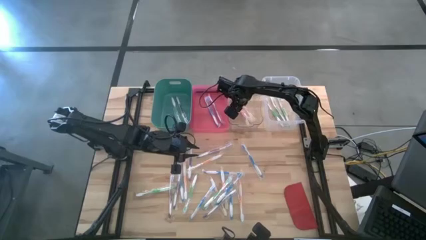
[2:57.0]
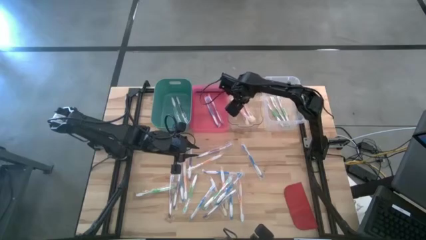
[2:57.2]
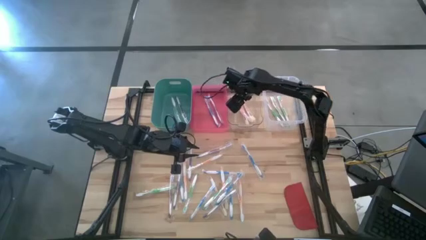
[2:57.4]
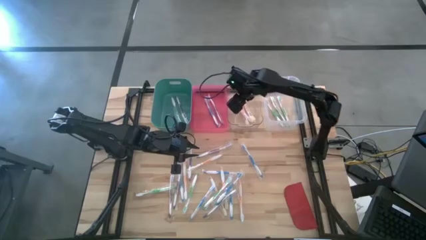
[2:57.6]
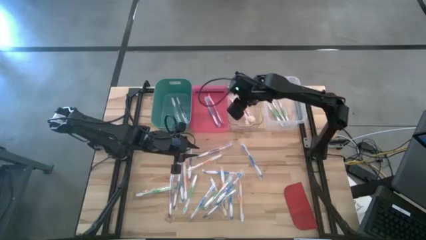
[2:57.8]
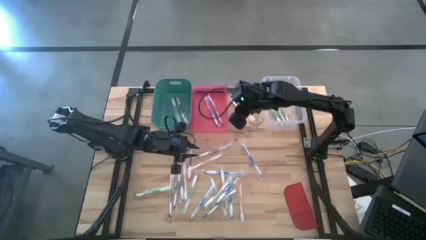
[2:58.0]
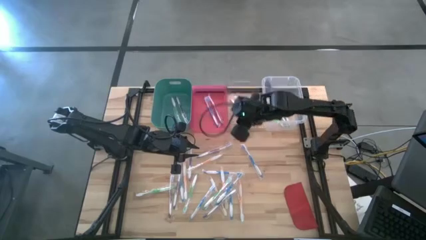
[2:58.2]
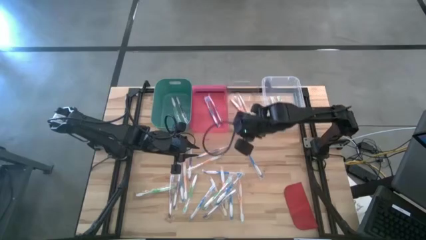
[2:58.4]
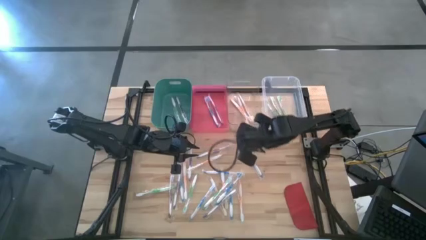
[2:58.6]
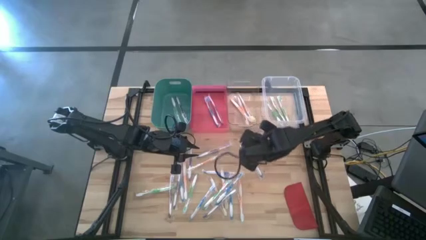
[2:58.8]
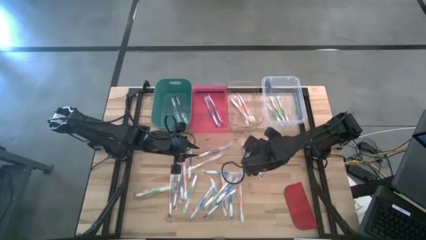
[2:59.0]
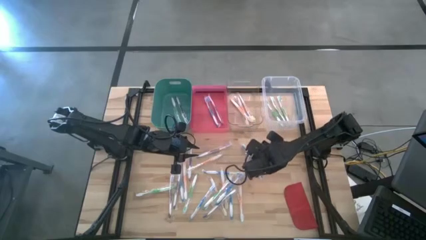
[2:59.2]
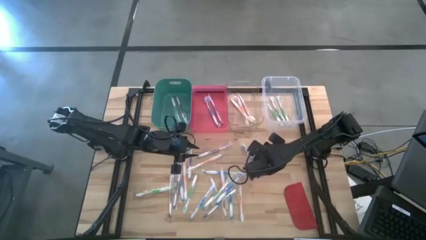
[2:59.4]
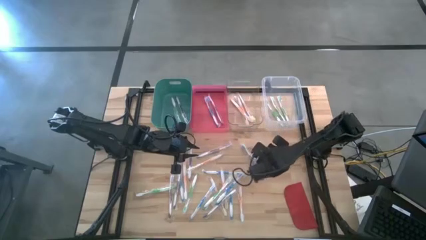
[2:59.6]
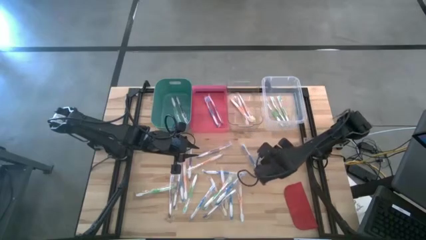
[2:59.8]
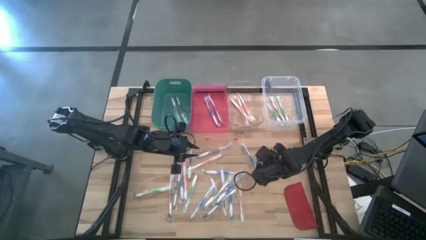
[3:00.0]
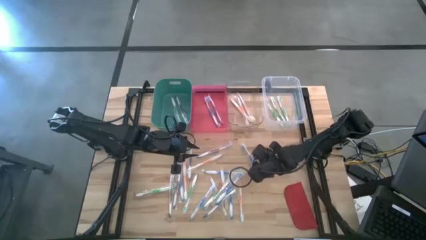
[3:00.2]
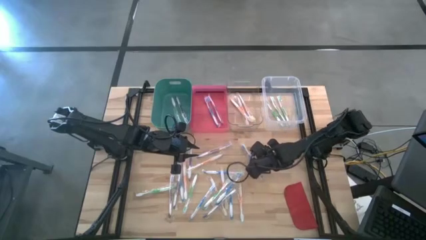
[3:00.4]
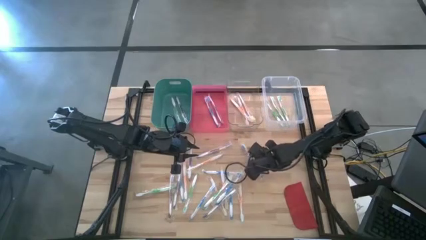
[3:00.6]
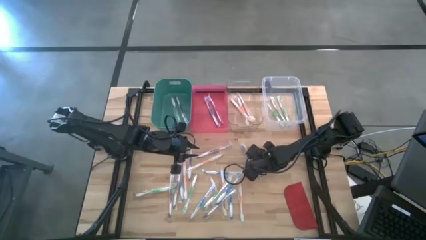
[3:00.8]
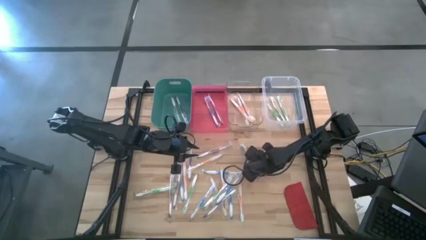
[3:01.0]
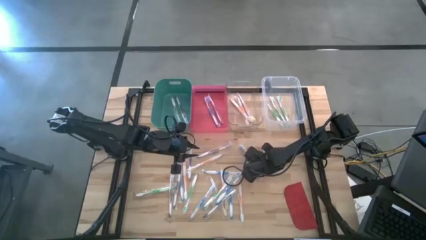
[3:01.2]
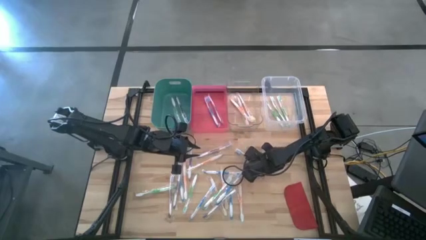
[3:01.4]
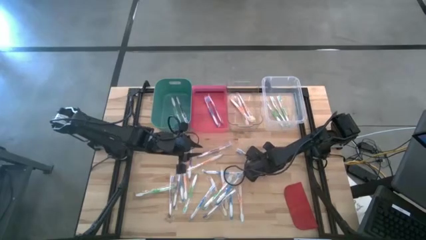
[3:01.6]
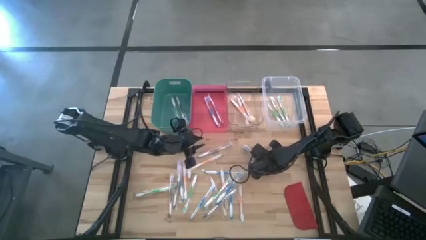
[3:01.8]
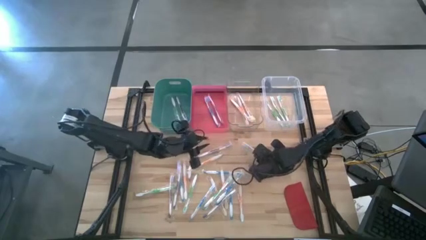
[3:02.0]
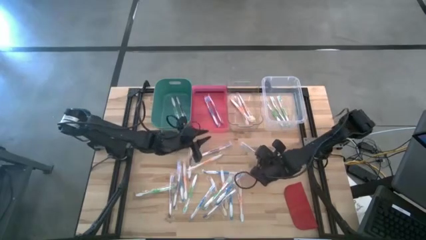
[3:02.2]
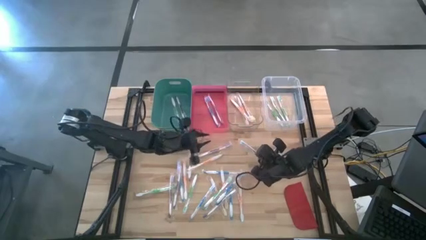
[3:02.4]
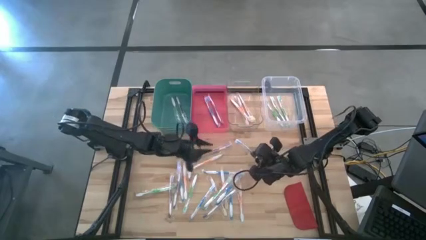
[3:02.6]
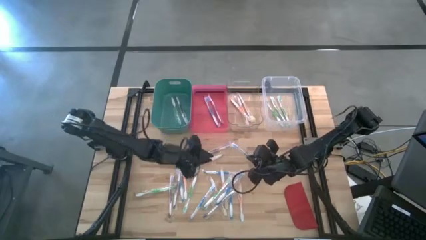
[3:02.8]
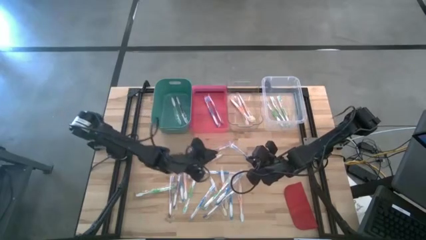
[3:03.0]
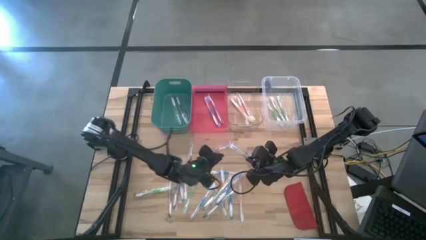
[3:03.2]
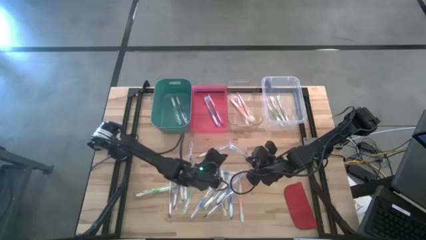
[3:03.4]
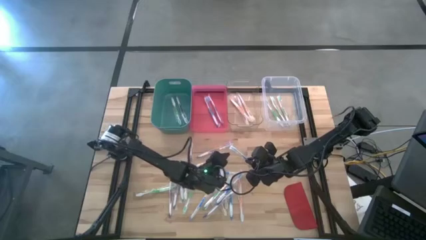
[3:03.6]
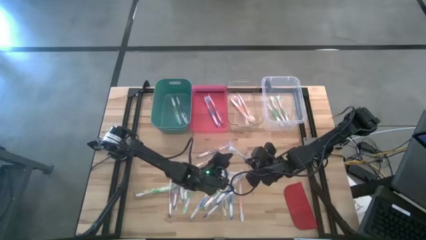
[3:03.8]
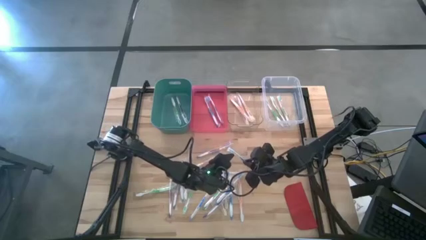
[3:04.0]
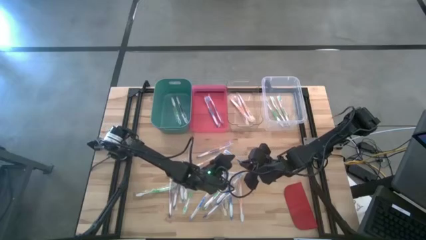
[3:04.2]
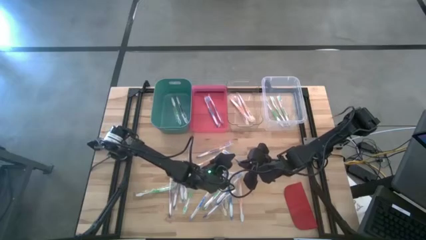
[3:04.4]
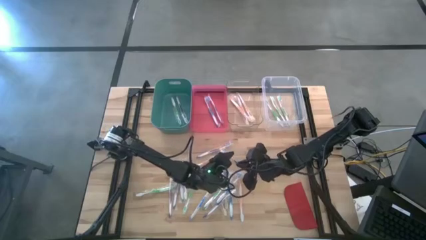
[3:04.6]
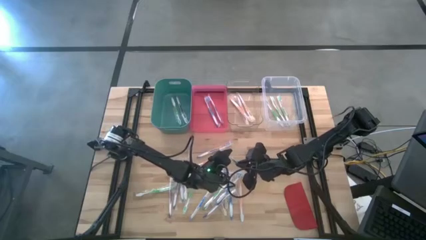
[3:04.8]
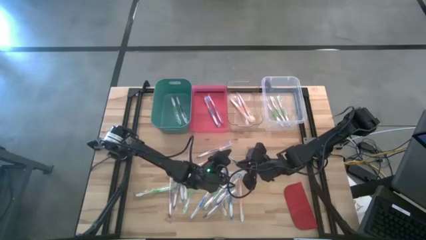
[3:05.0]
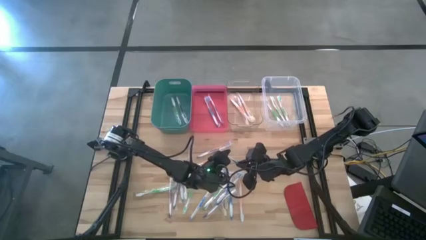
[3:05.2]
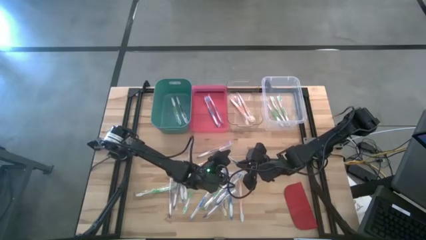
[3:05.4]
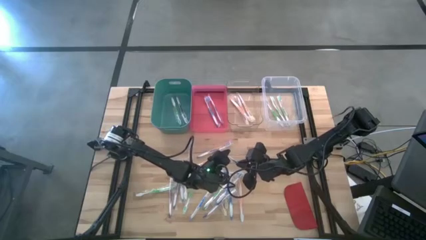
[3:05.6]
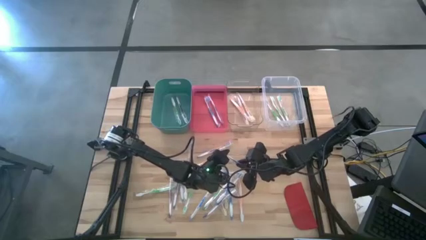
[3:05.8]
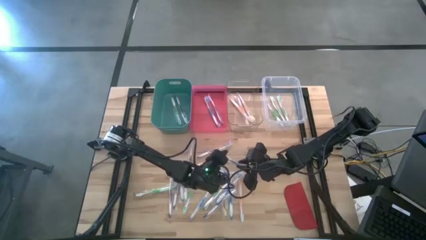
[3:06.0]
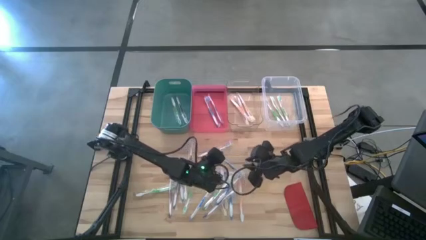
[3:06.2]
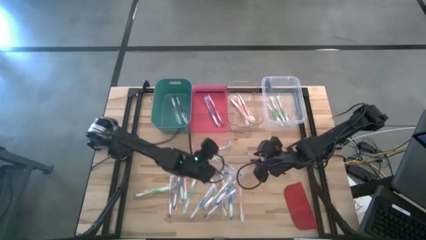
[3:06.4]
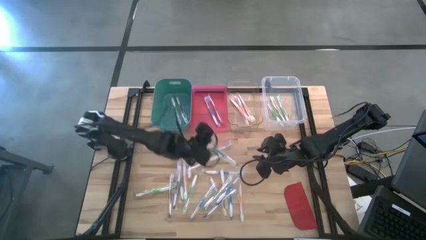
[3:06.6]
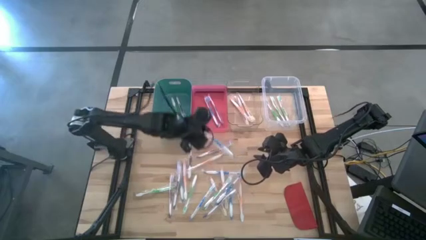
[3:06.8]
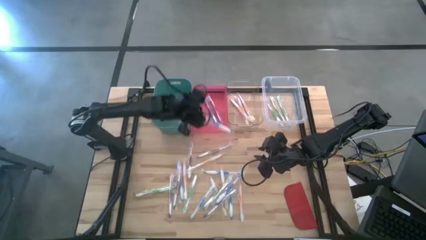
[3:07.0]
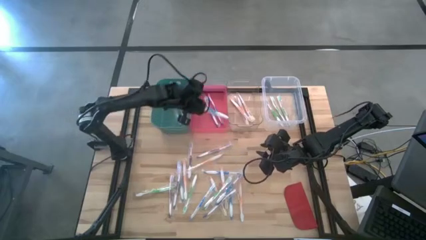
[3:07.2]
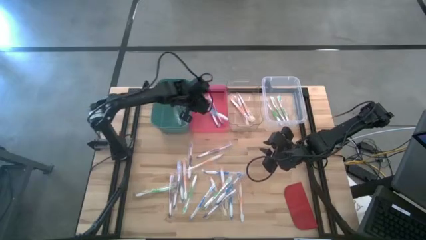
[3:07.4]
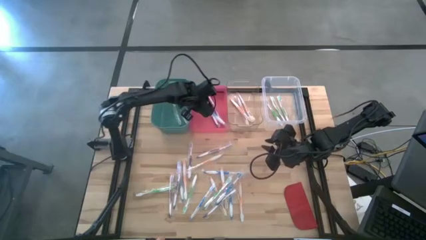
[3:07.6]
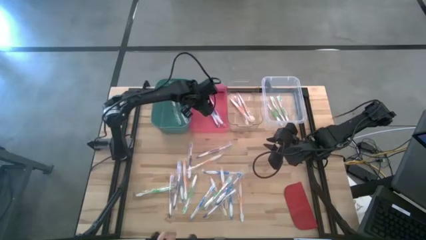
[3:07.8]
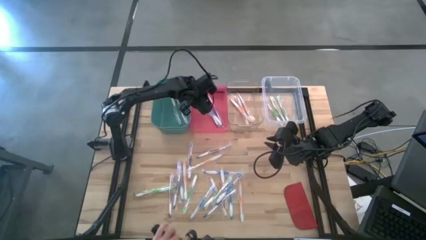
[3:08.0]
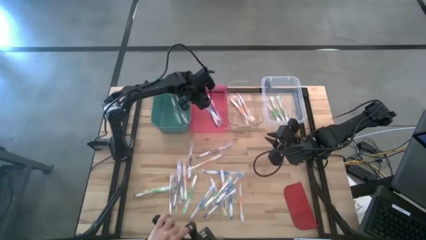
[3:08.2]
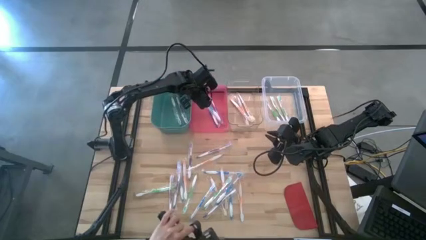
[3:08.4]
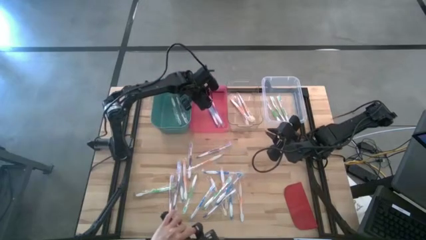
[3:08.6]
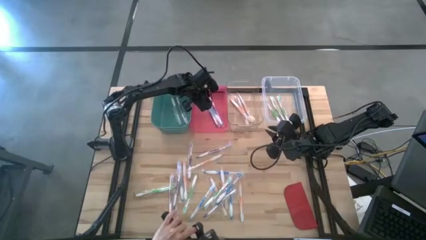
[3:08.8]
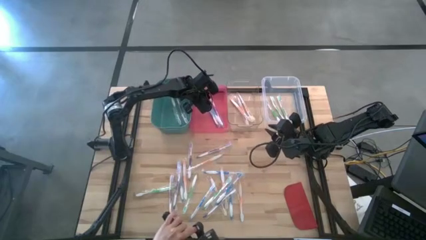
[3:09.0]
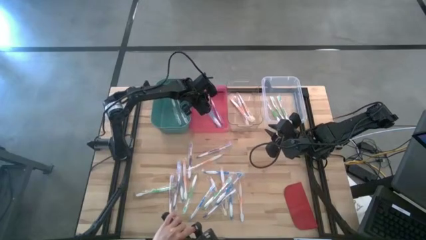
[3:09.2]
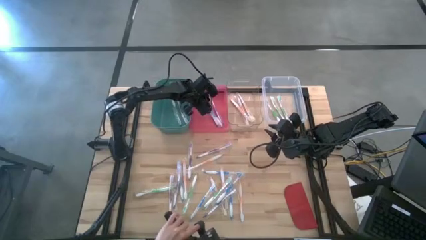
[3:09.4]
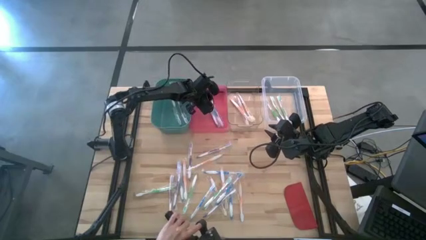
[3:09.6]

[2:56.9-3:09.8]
Task: Pick & Place Toothbrushes
Put the blue toothbrush into the red bin

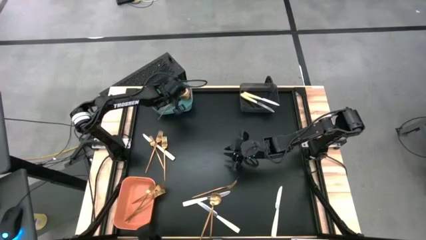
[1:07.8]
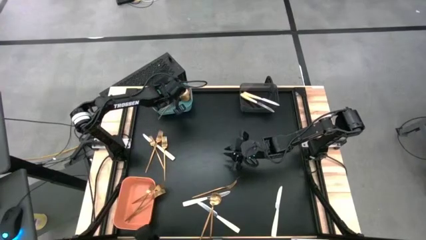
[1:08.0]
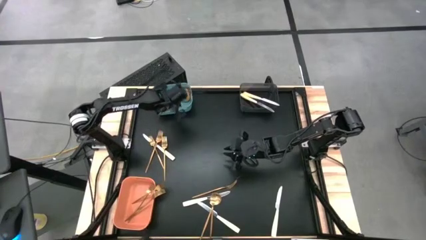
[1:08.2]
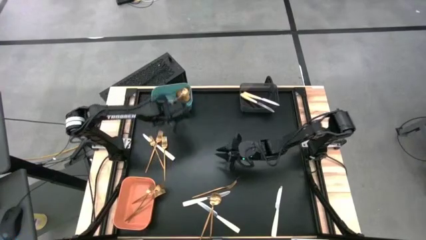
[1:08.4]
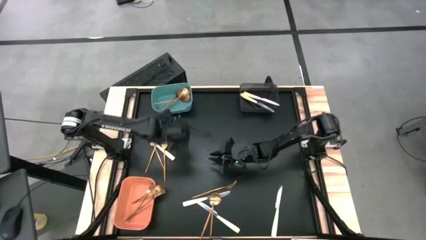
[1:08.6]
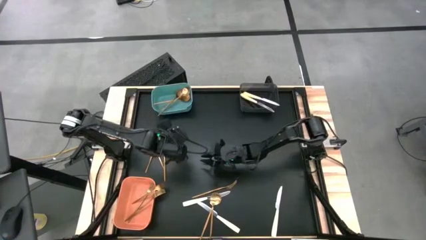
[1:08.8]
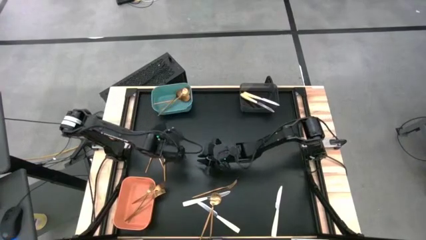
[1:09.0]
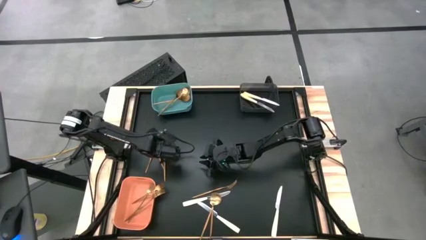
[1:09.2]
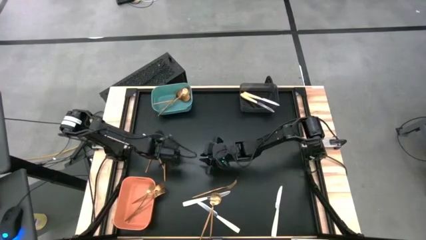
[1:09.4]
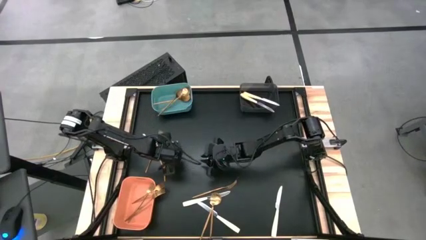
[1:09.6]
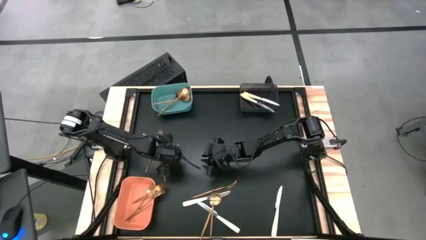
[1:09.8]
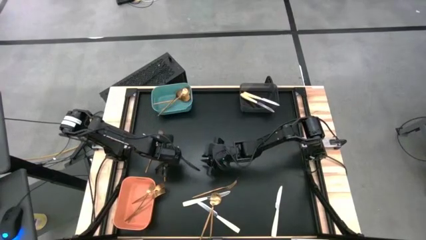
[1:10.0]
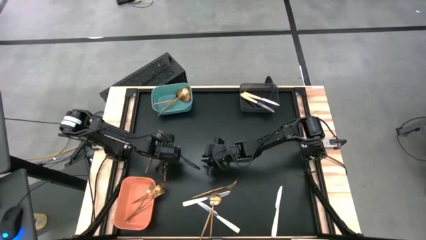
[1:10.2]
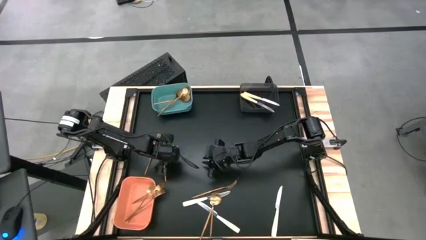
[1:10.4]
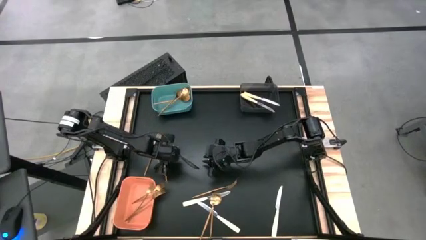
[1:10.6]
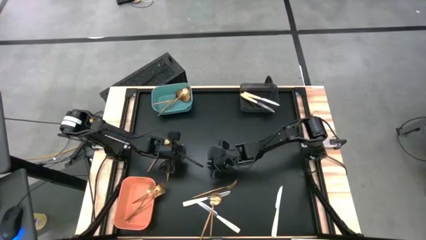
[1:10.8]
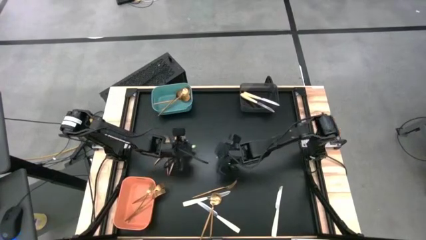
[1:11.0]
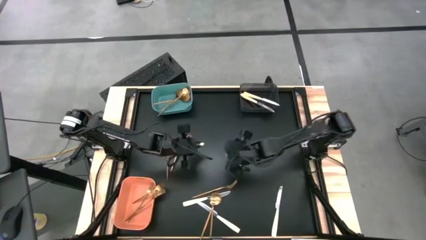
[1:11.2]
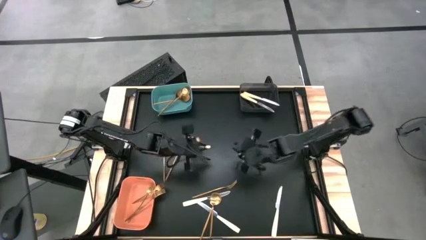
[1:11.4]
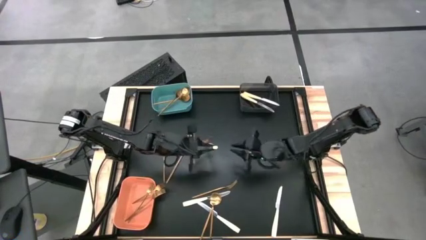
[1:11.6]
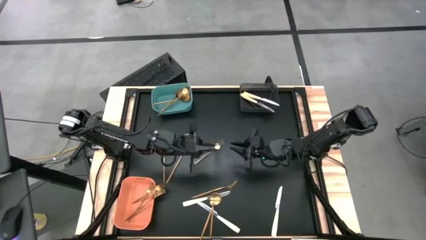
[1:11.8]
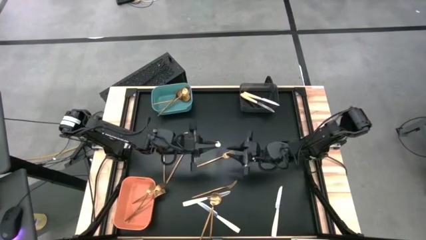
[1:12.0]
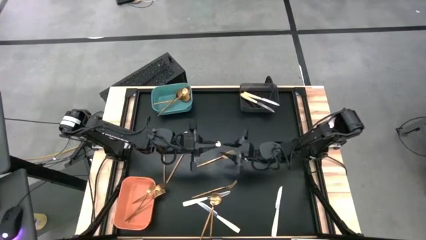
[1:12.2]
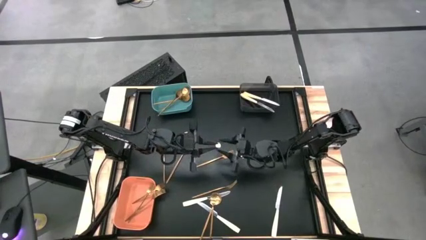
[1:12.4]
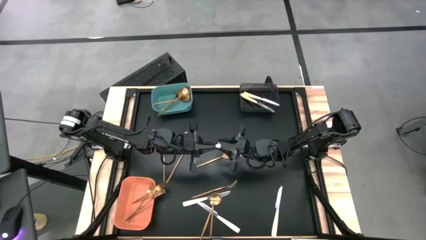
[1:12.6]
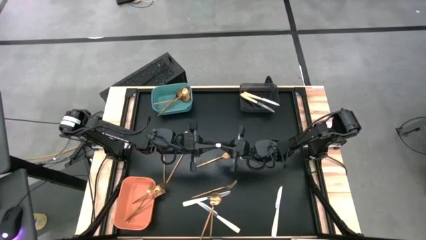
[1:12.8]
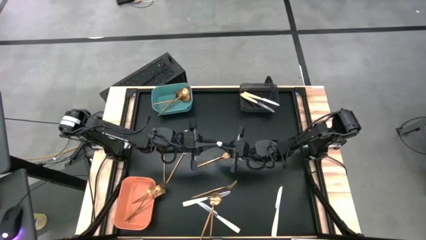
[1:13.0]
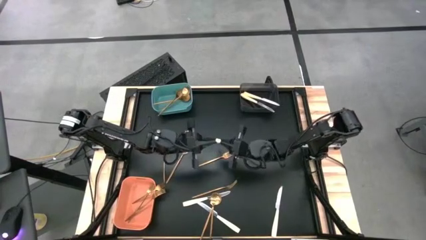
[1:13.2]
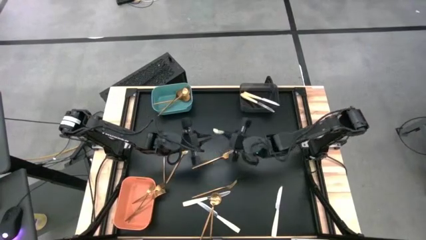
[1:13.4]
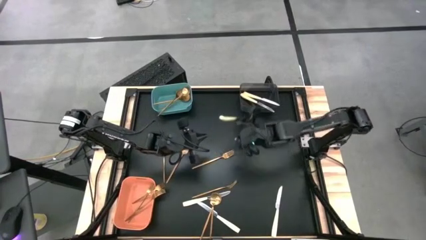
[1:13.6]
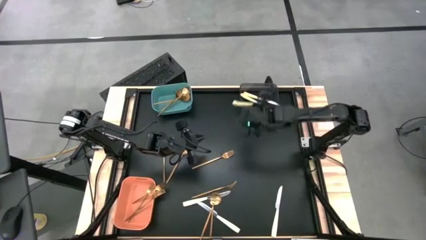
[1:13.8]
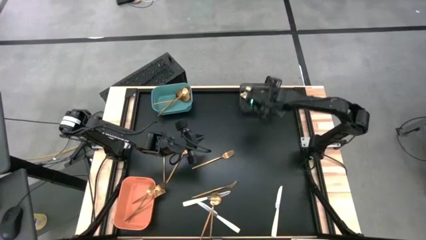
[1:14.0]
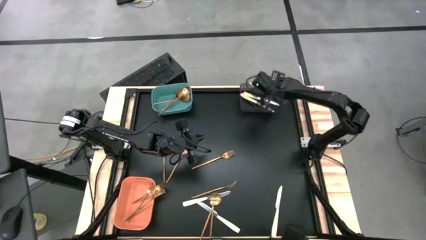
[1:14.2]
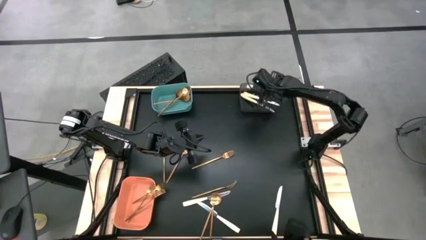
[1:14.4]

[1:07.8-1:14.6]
Task: Sort silverware by color (type)
Put the yellow knife into the black bin
